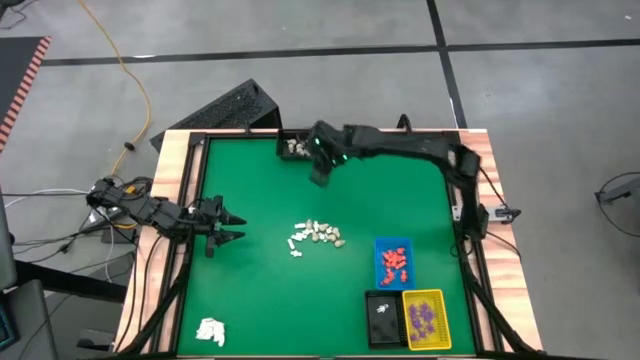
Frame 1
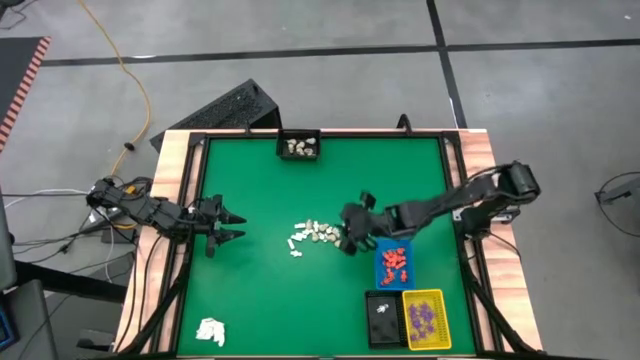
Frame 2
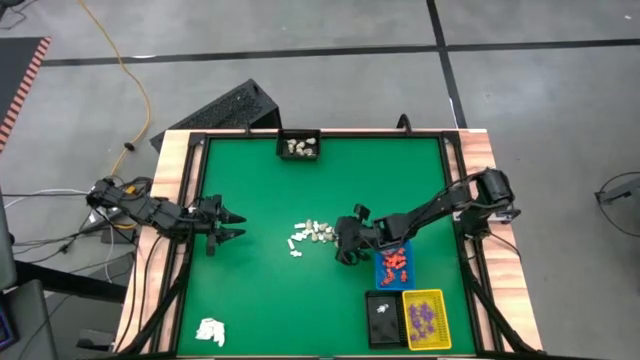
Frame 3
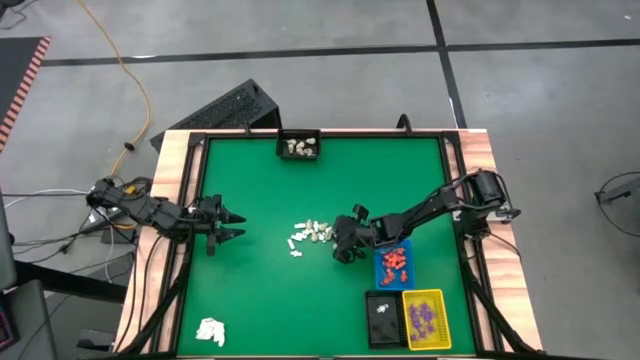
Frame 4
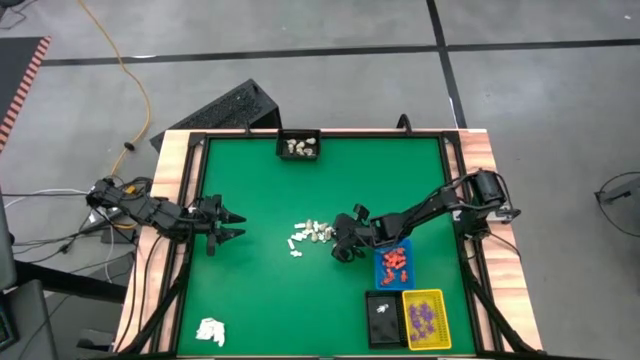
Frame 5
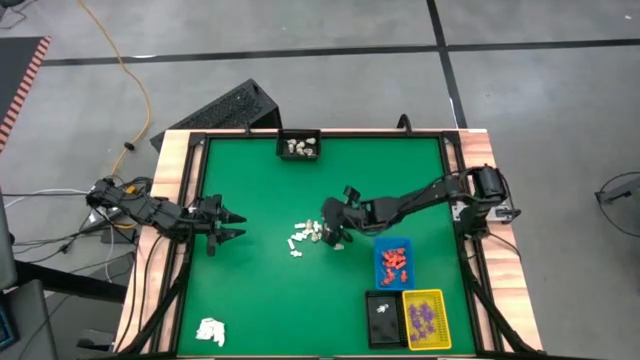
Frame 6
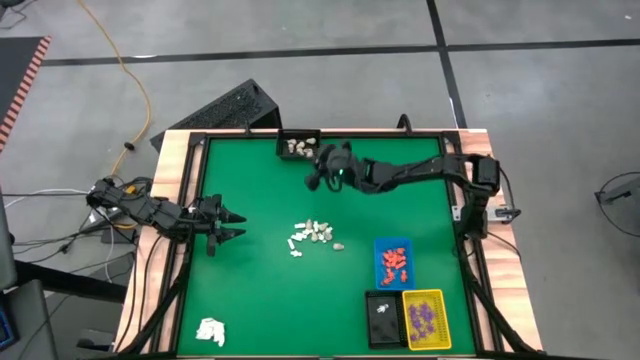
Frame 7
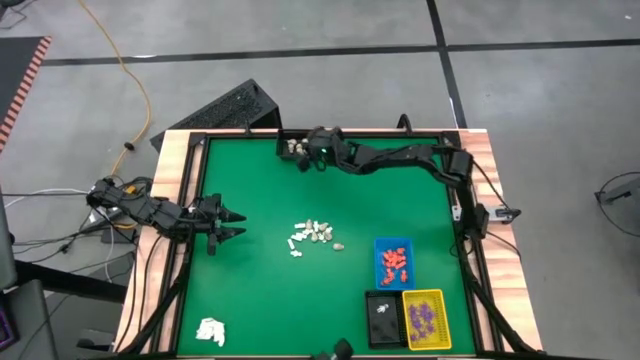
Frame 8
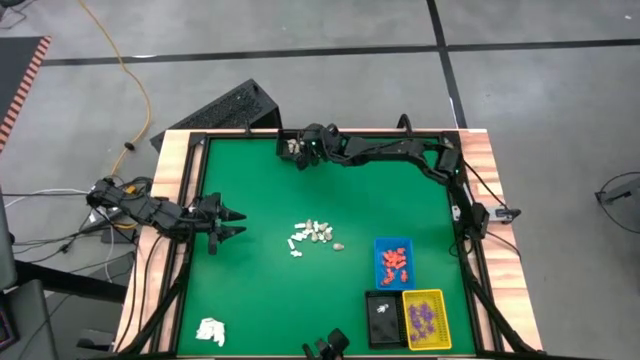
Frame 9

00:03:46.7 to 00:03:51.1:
Task: Sort Halloween decoration
Put the gray skull toy into the top black bin

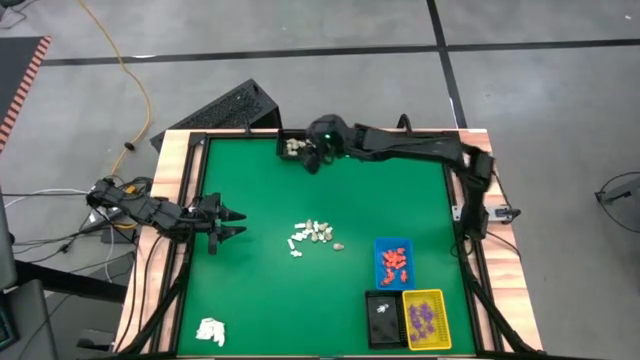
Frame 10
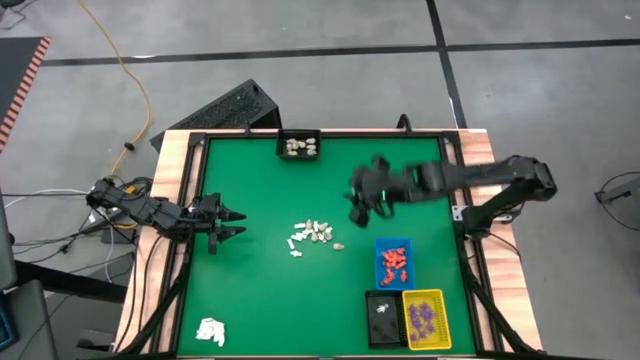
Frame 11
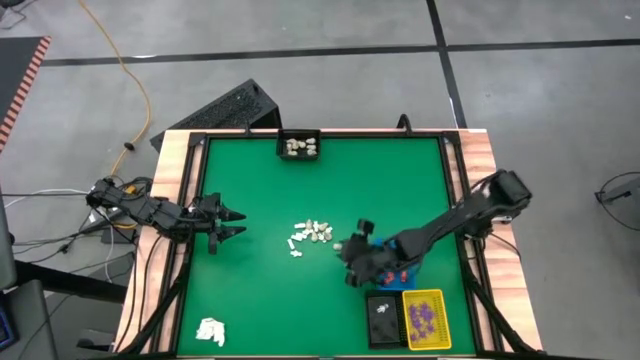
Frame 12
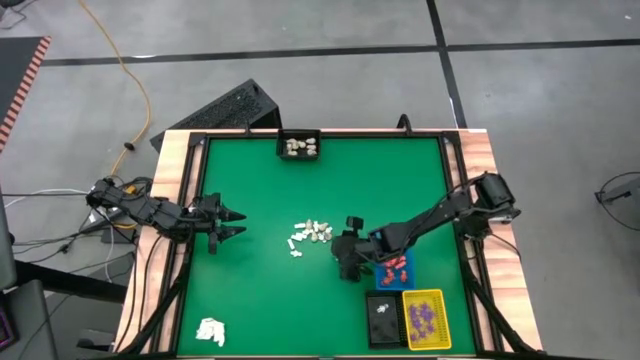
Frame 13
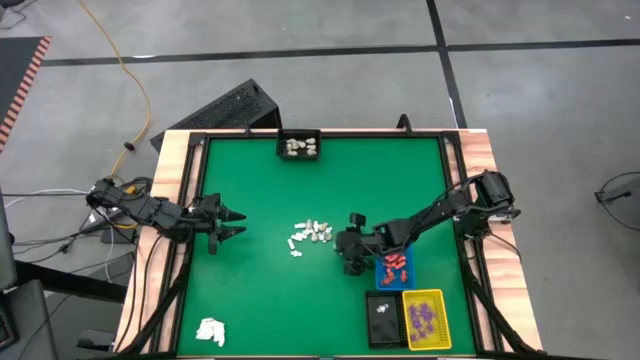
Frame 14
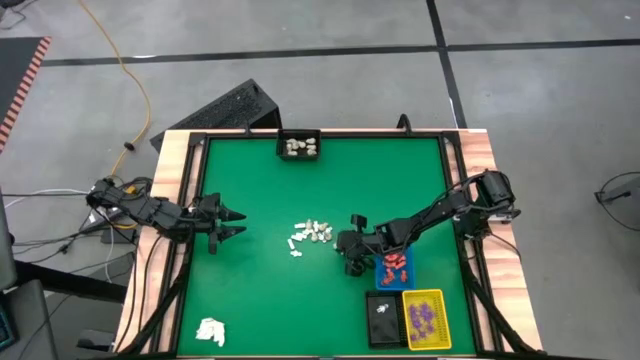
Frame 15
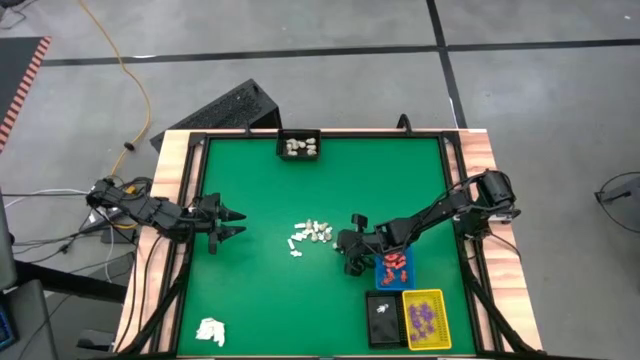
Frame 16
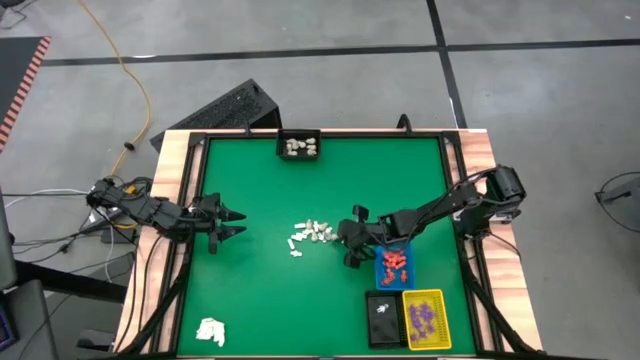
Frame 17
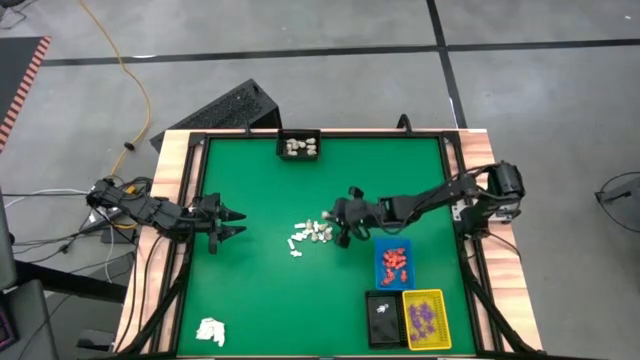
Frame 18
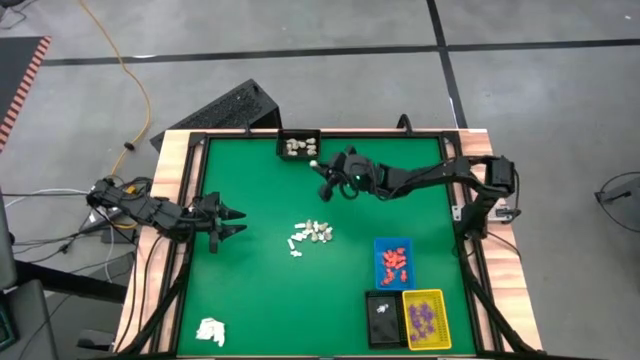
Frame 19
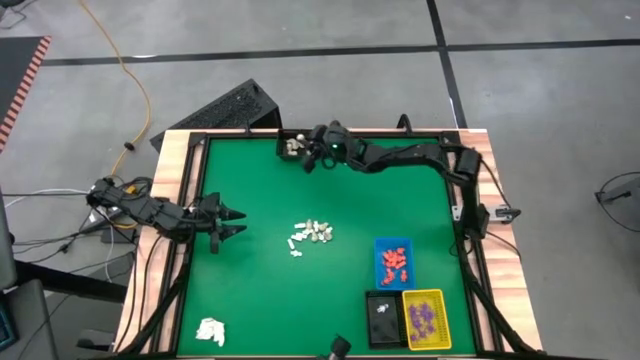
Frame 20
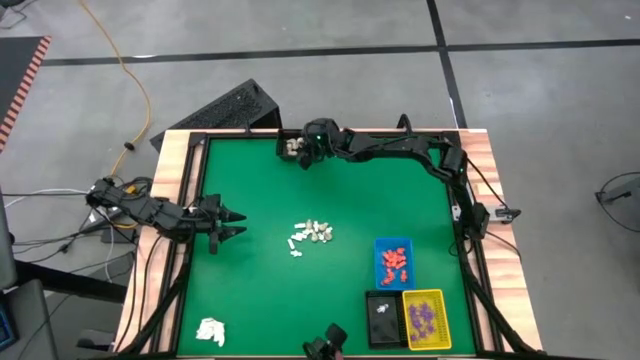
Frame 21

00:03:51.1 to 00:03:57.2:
Put the gray skull toy into the top black bin

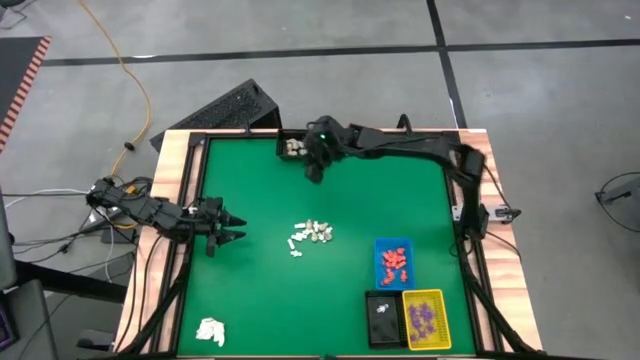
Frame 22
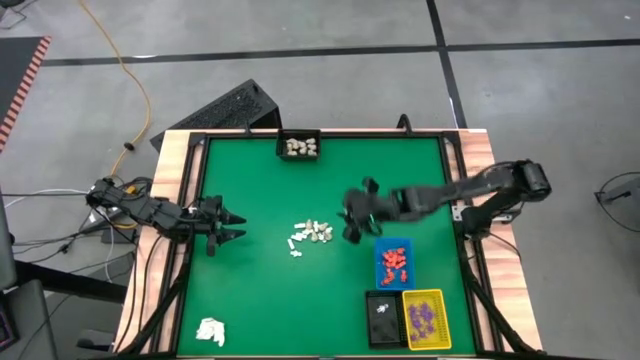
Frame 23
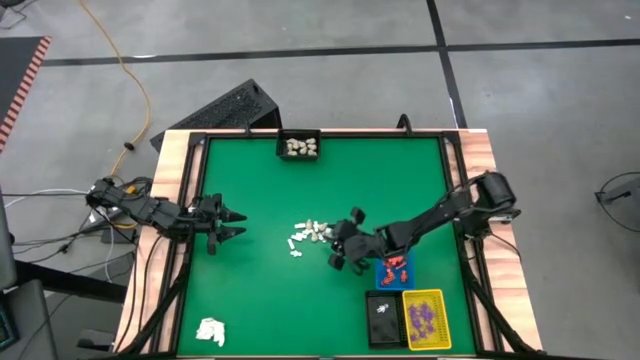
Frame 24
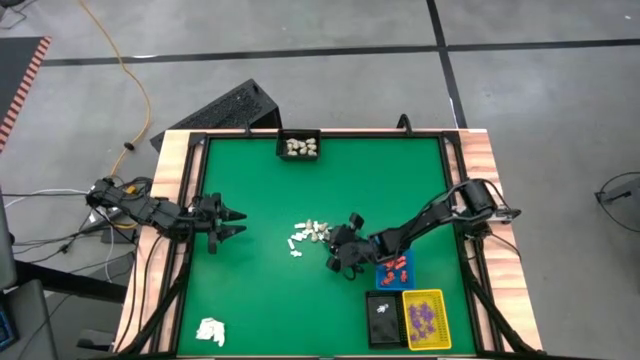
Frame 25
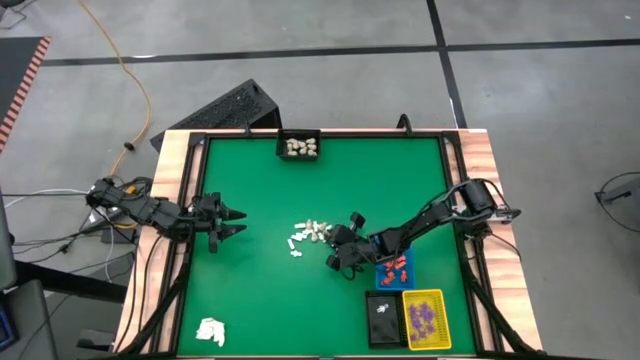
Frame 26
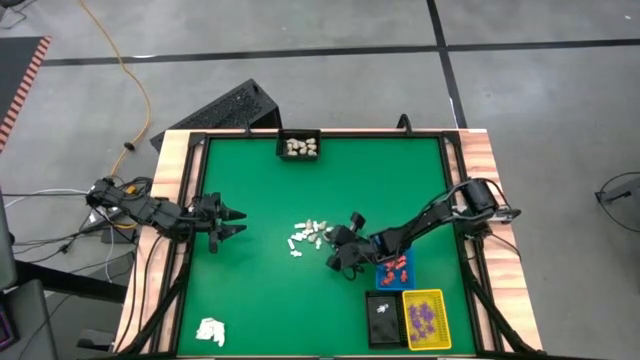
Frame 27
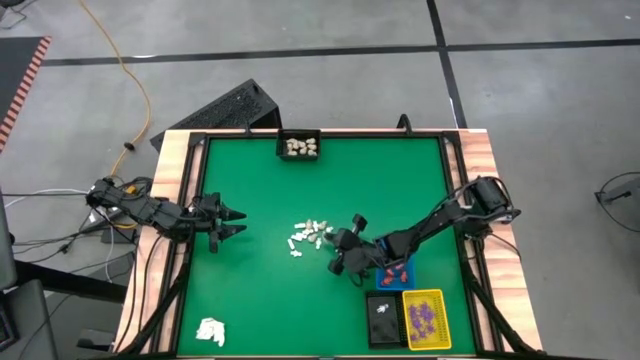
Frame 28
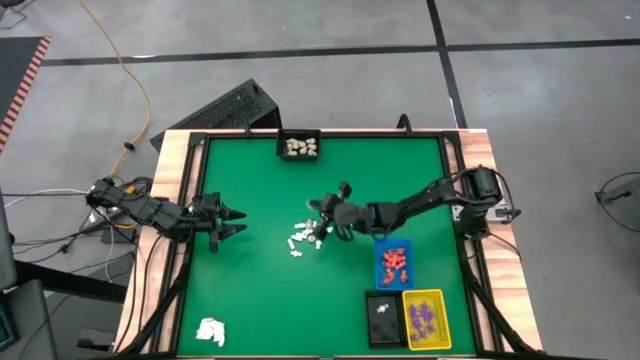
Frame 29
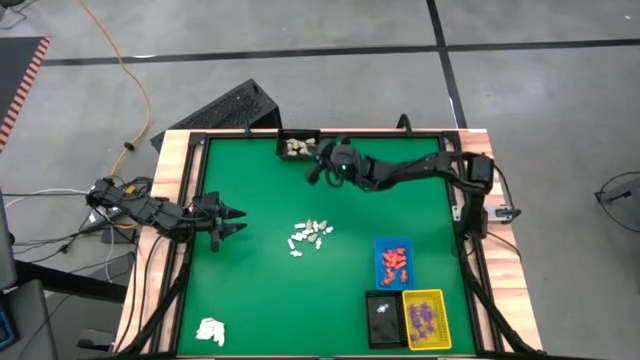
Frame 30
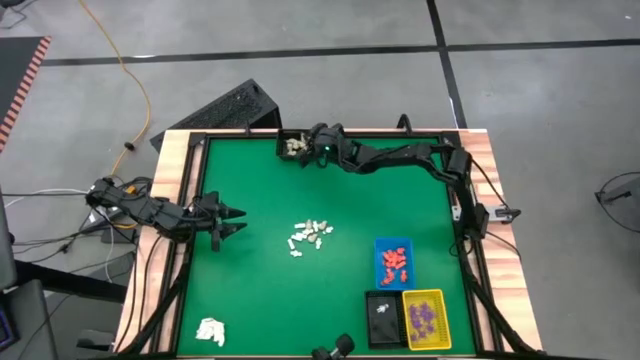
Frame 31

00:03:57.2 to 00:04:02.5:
Put the gray skull toy into the top black bin

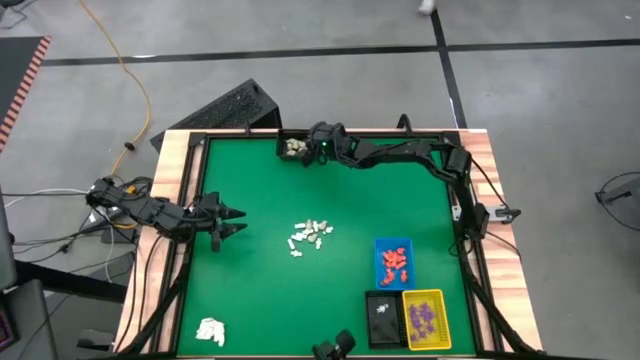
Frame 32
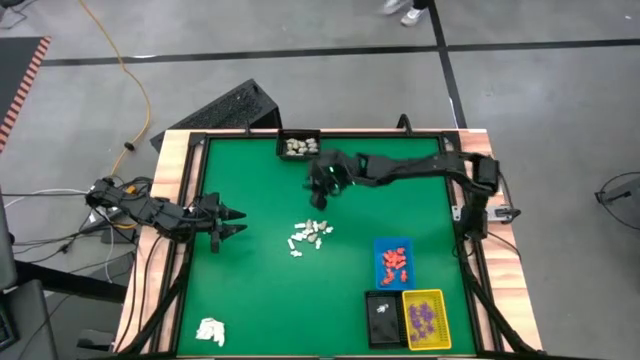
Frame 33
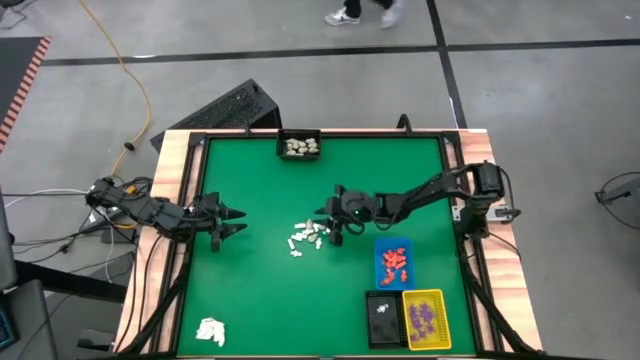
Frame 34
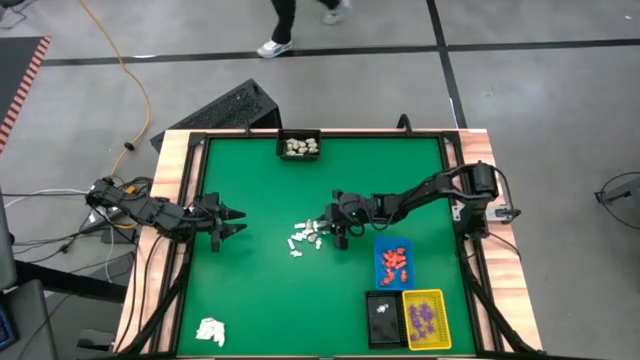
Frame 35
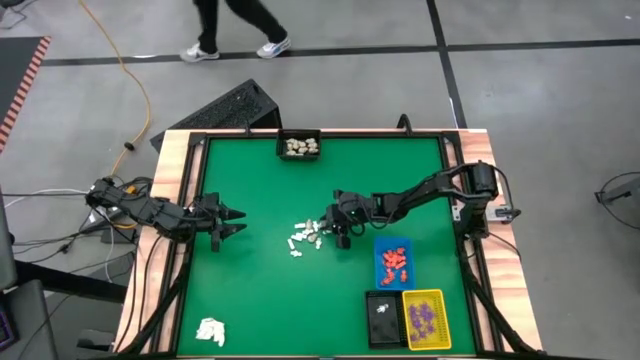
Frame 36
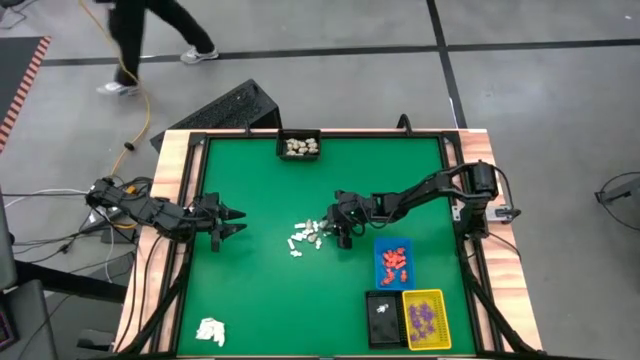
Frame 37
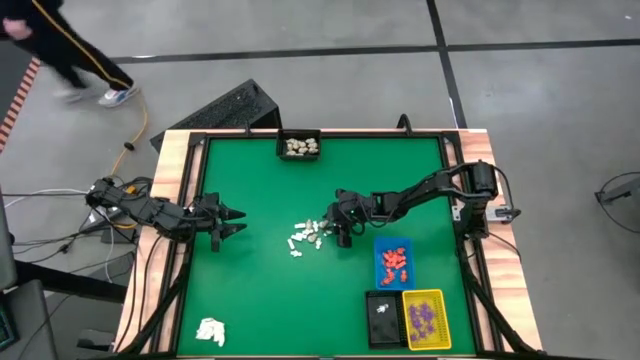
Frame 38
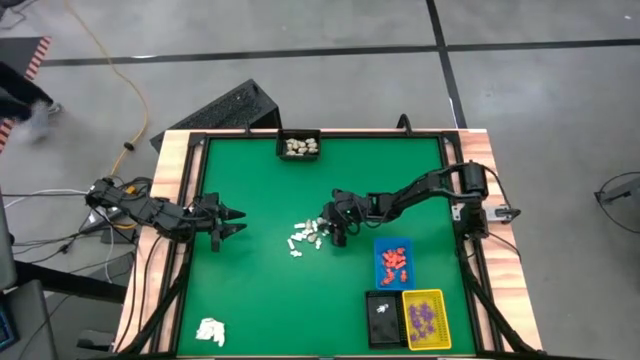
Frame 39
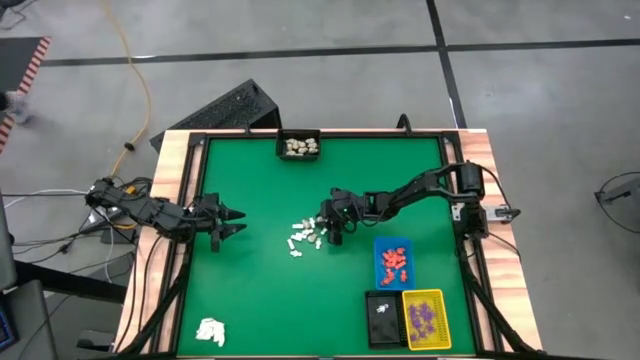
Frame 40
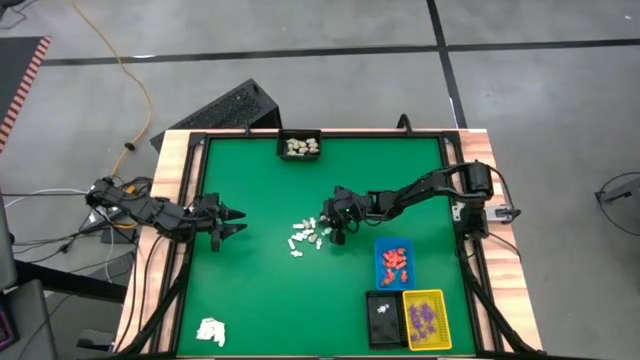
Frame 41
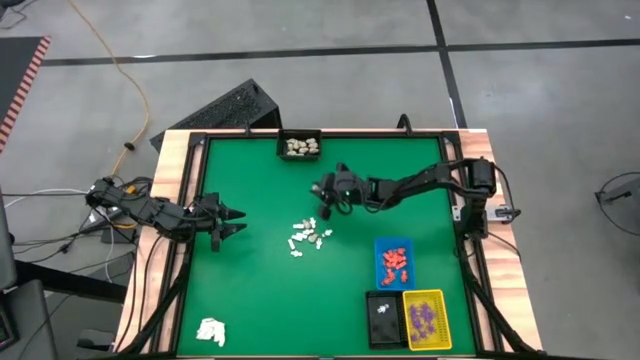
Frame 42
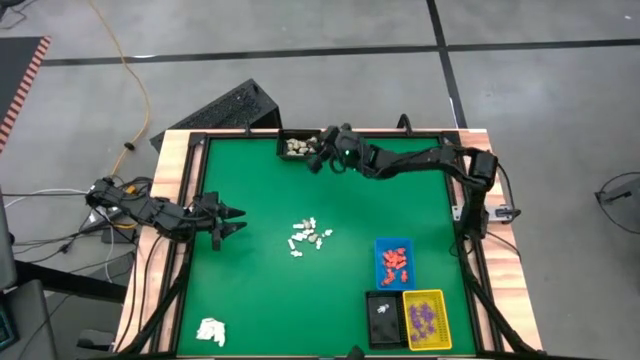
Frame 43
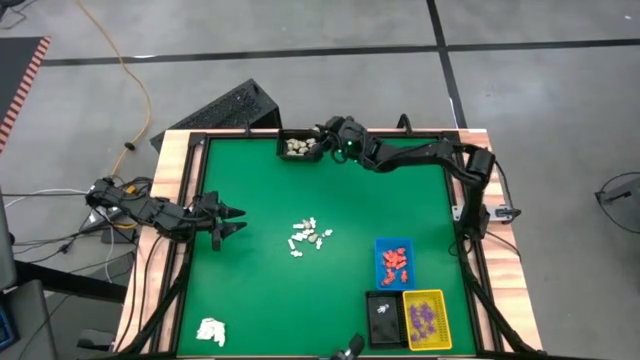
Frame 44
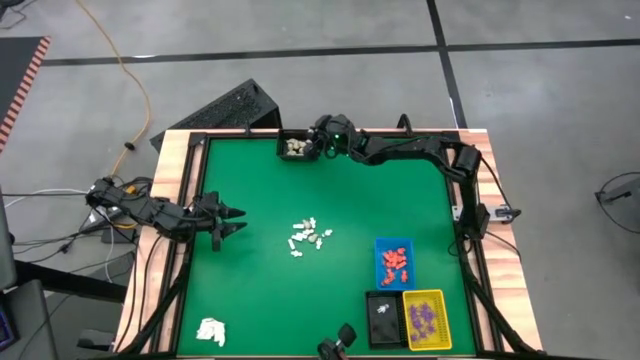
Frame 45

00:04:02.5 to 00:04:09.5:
Put the gray skull toy into the top black bin
